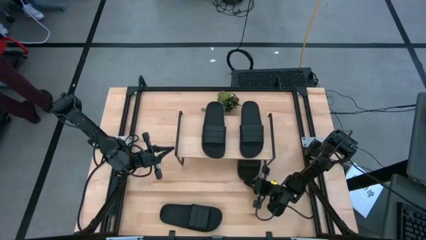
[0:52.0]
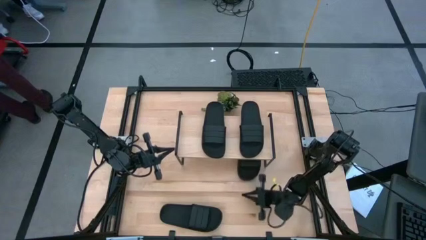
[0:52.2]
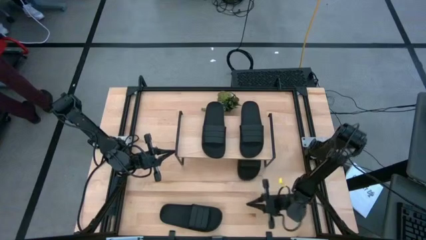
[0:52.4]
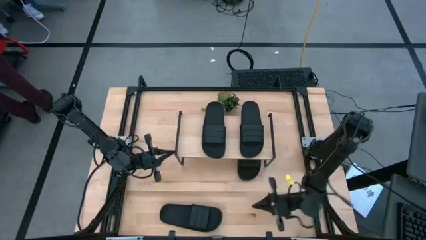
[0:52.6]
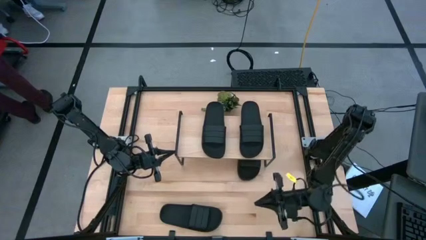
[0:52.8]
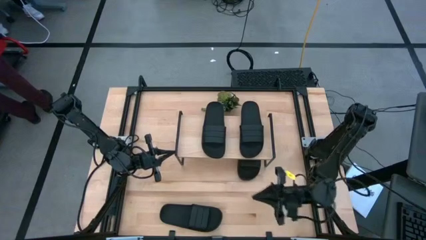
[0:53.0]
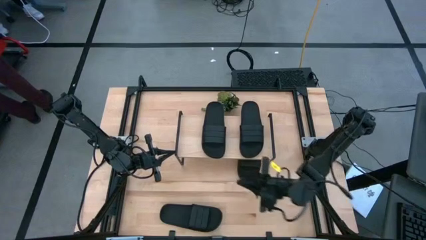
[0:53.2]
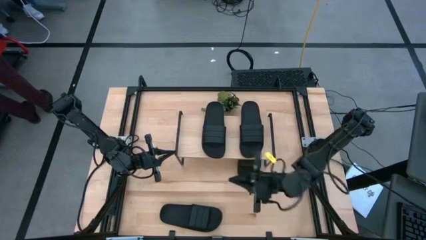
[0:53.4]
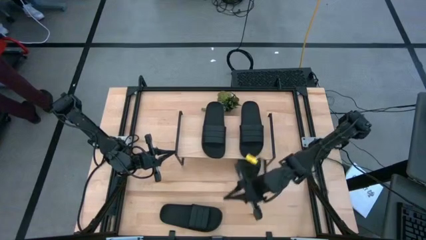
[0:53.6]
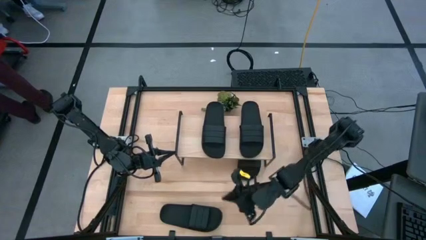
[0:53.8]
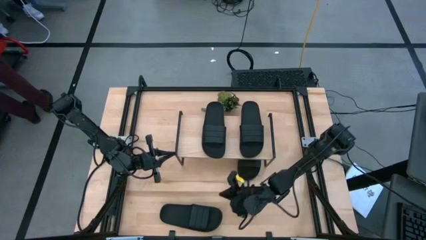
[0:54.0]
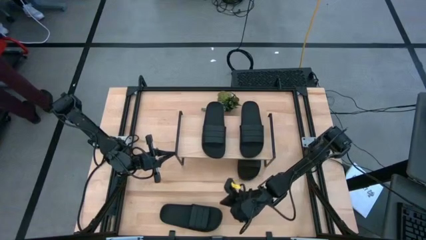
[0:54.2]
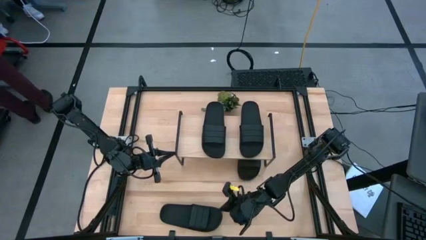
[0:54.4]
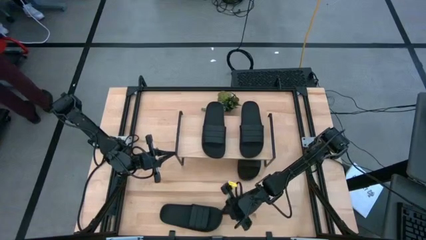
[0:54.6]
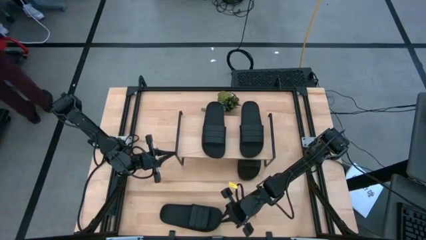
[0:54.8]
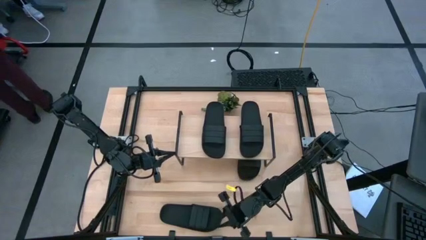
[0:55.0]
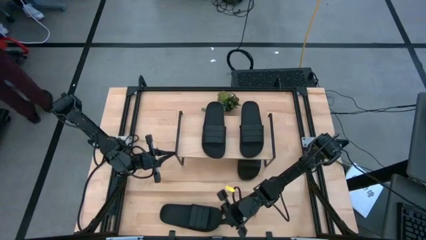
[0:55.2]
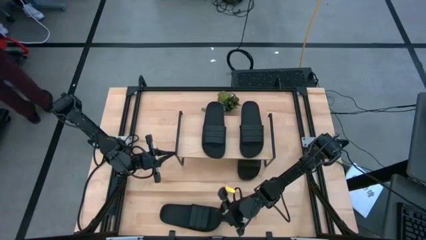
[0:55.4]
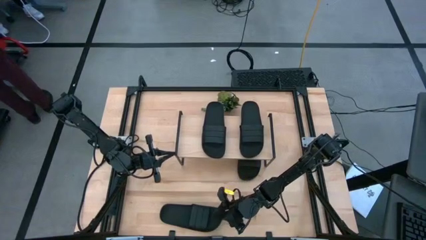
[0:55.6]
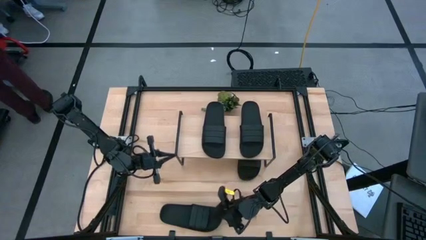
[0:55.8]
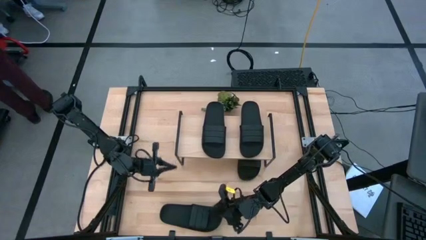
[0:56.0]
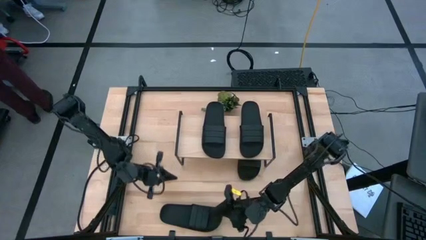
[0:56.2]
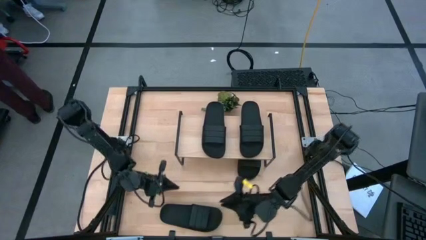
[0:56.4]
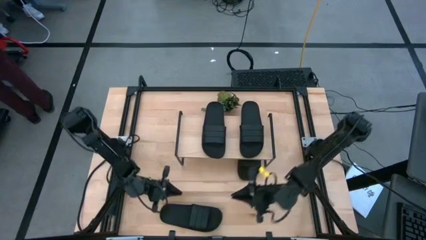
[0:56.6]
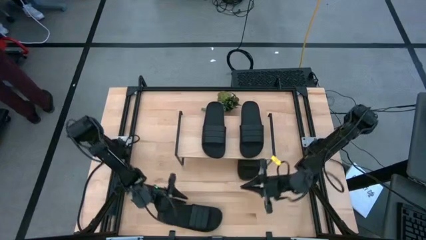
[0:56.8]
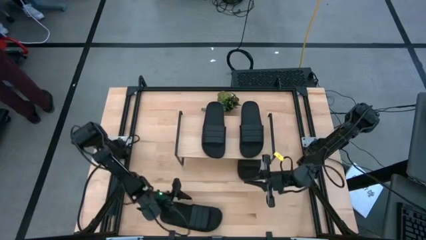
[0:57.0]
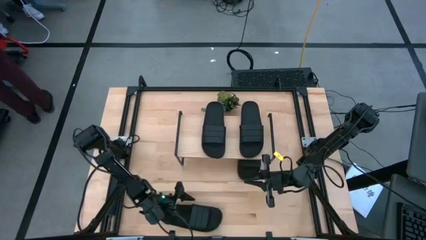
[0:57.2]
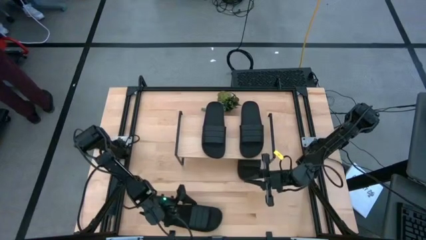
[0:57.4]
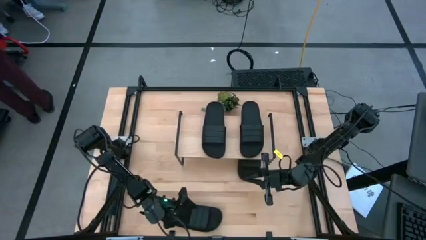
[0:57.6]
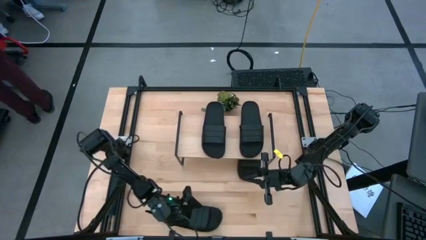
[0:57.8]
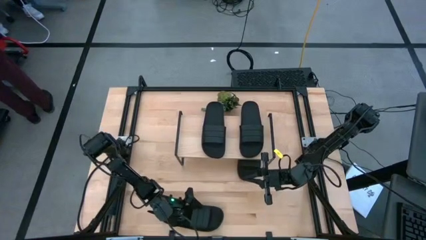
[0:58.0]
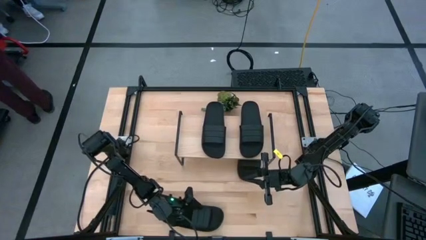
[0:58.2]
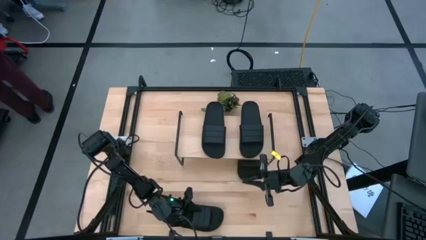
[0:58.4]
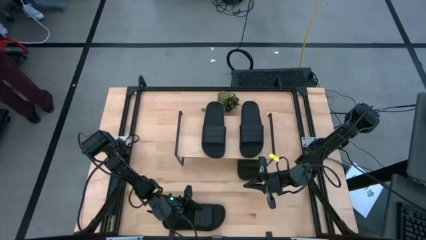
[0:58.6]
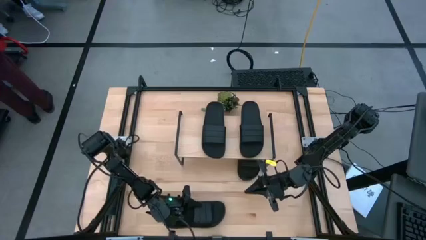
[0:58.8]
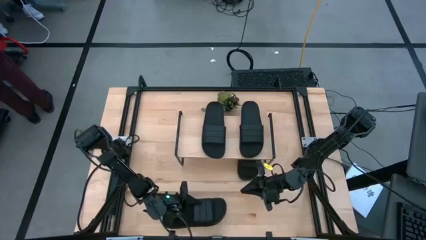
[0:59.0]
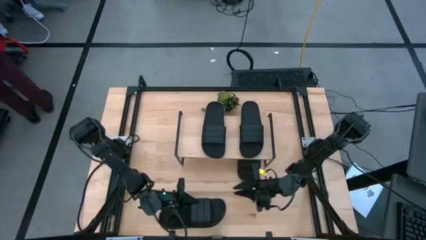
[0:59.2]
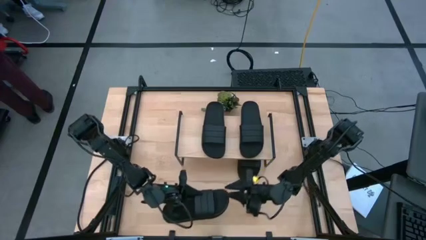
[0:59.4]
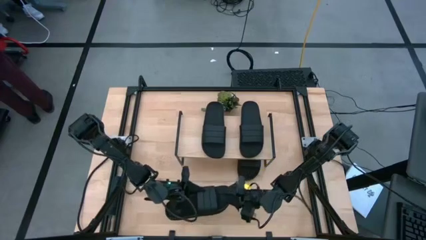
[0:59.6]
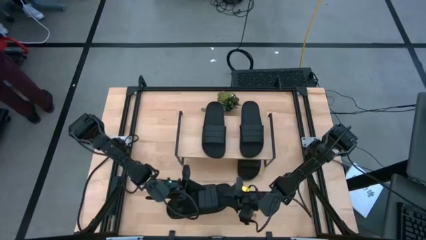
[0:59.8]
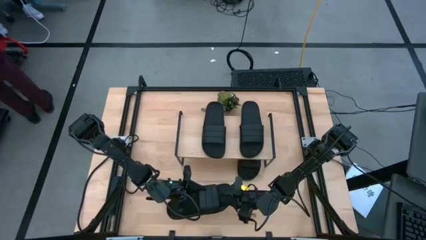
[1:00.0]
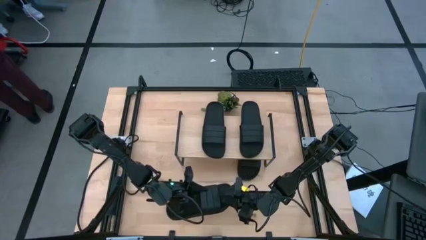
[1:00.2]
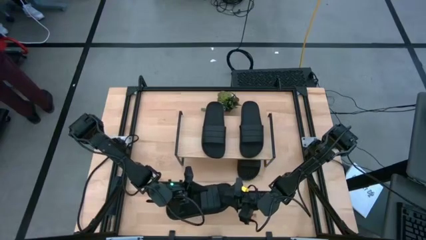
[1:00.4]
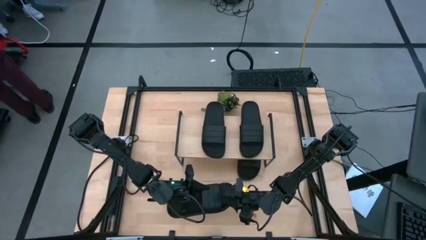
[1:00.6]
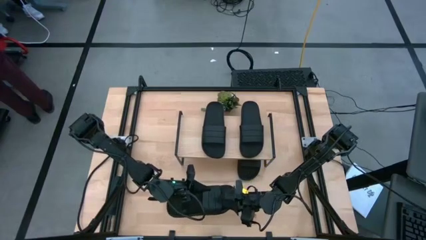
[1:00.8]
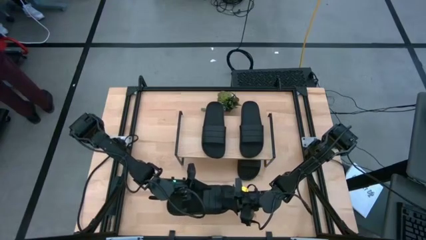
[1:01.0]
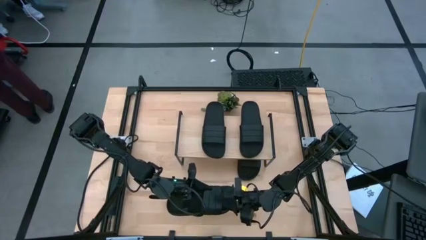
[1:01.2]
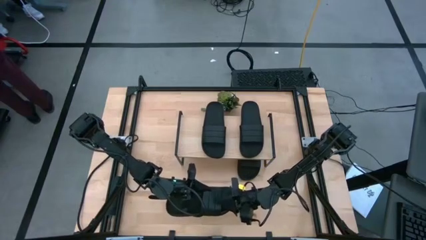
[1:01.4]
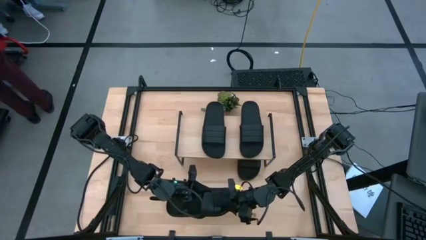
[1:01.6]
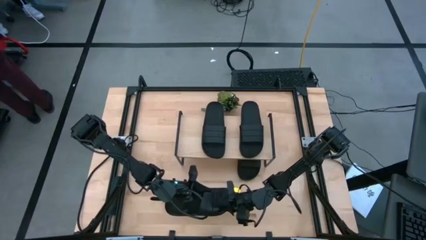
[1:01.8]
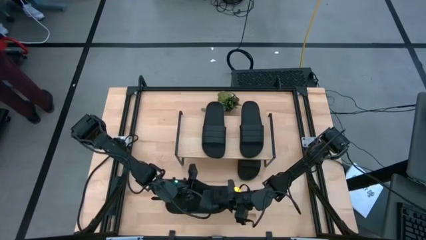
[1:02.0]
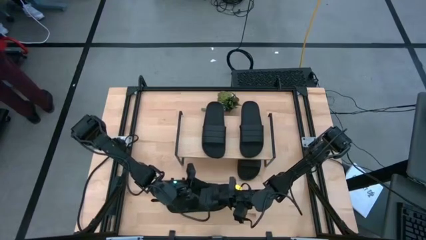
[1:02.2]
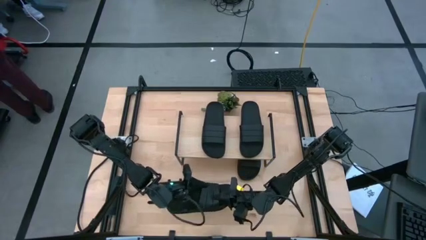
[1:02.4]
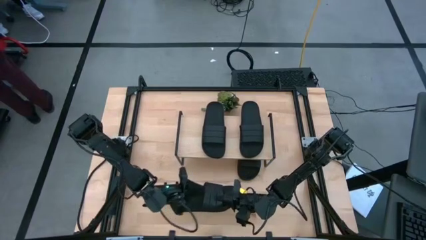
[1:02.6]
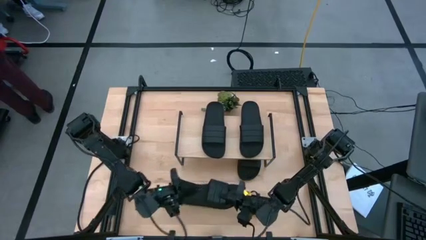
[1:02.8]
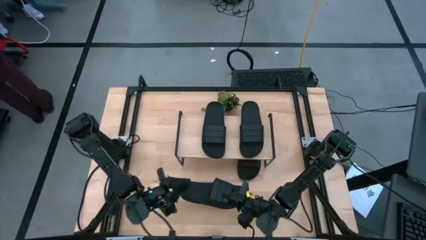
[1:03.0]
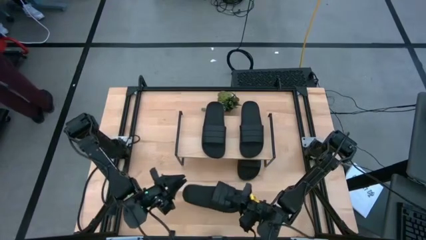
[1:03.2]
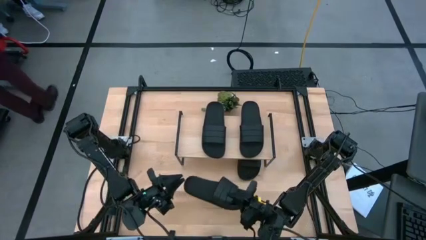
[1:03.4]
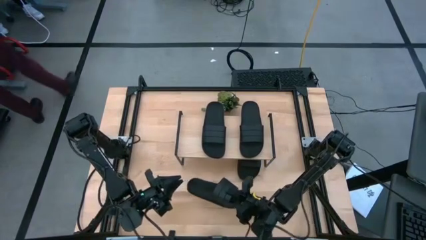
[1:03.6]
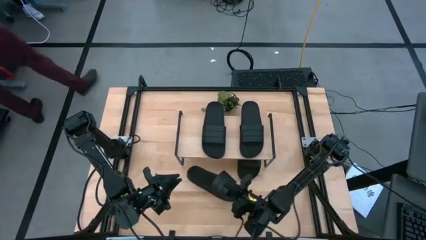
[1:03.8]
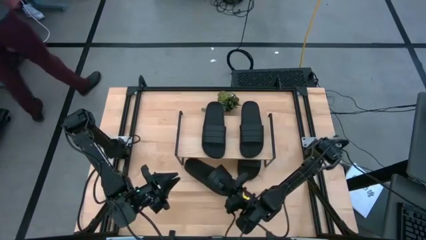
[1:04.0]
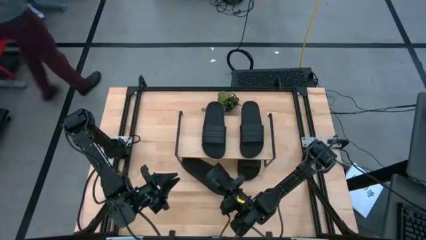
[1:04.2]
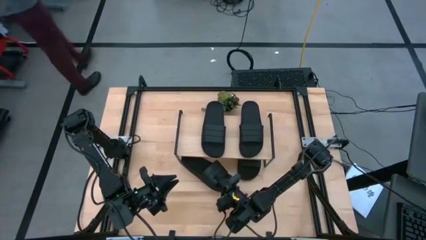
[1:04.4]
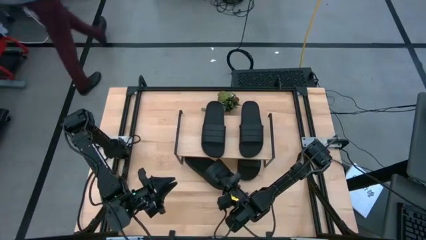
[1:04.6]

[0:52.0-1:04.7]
Task: Pick and place slides into the shelf
Put the black slipper under the shelf
